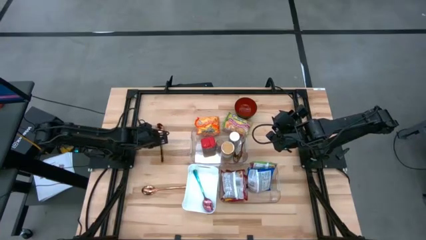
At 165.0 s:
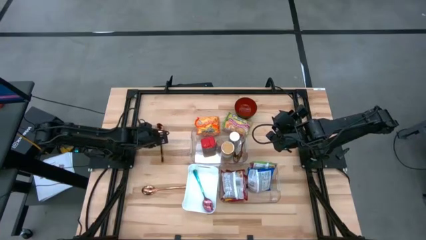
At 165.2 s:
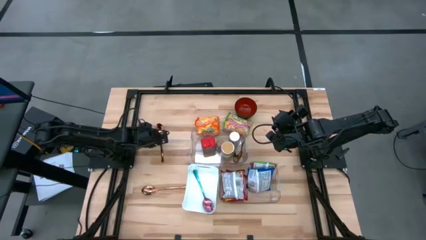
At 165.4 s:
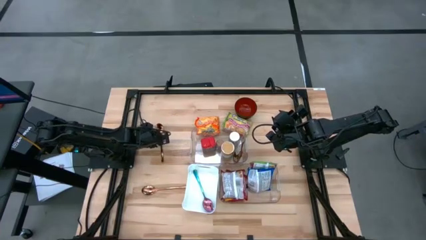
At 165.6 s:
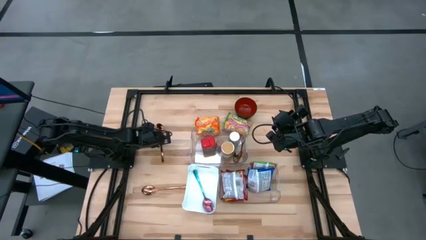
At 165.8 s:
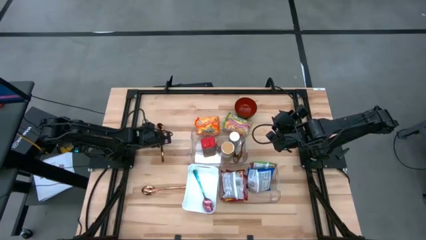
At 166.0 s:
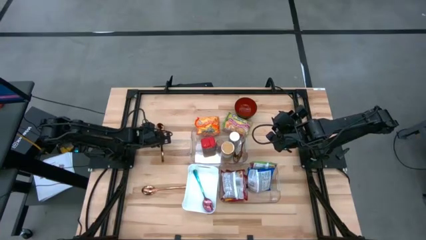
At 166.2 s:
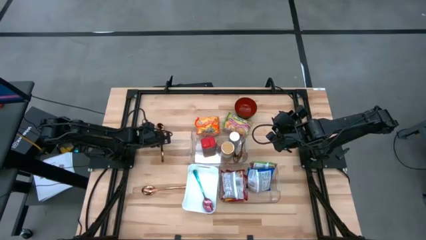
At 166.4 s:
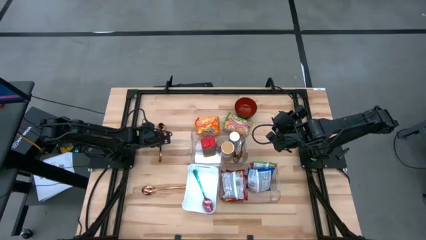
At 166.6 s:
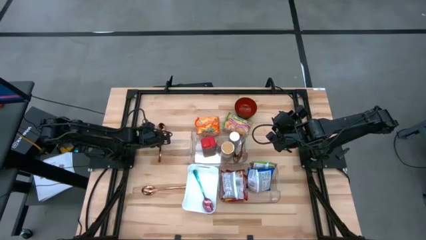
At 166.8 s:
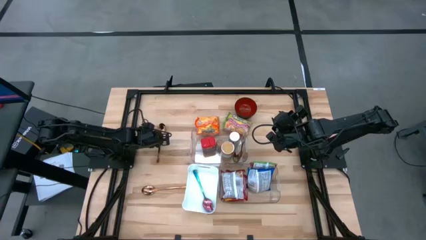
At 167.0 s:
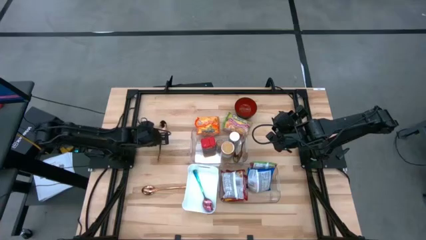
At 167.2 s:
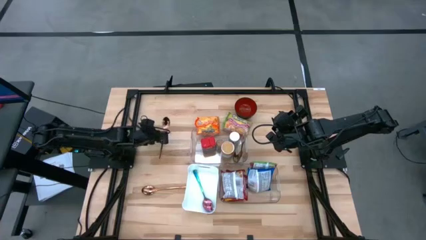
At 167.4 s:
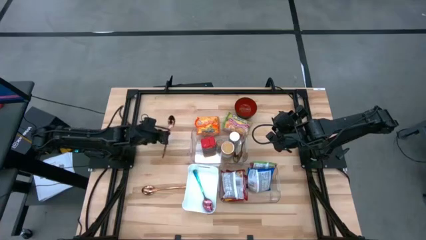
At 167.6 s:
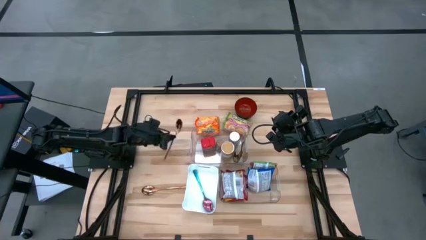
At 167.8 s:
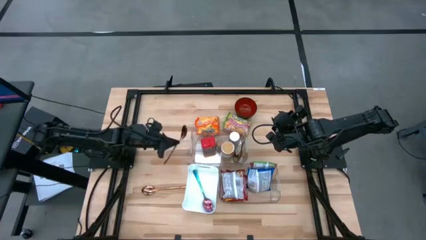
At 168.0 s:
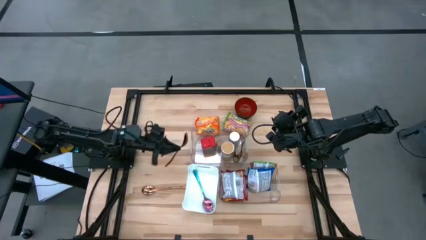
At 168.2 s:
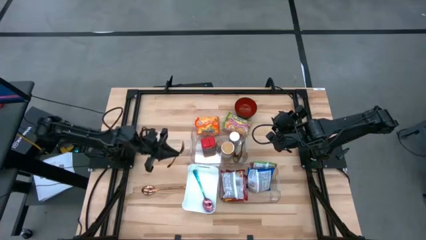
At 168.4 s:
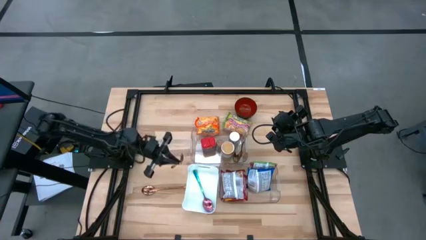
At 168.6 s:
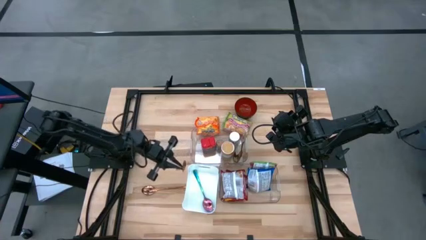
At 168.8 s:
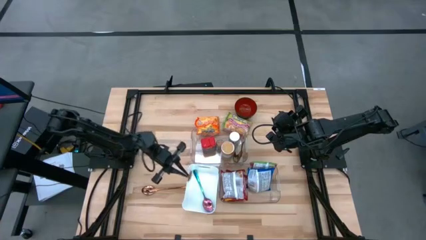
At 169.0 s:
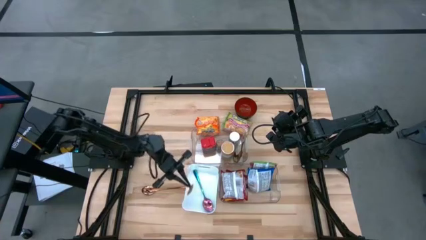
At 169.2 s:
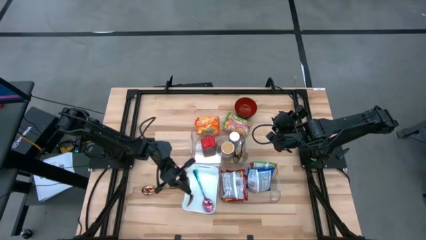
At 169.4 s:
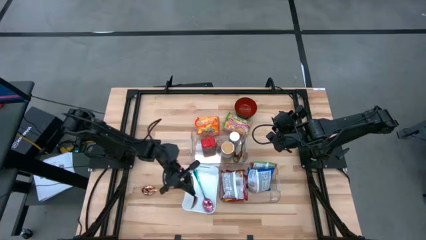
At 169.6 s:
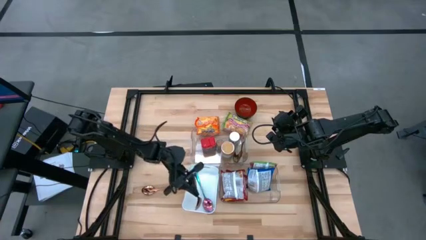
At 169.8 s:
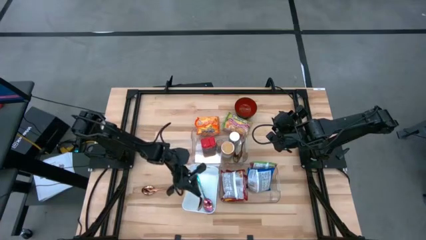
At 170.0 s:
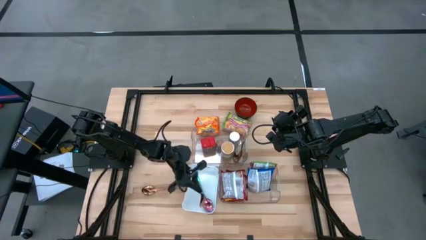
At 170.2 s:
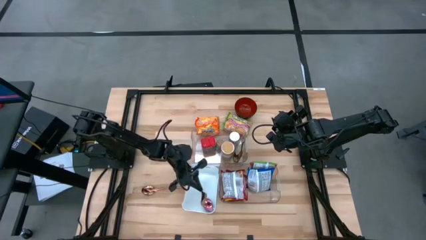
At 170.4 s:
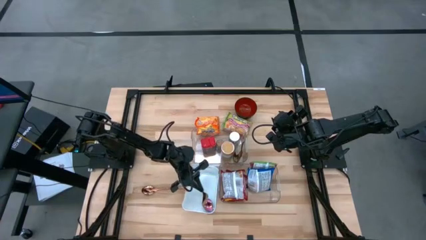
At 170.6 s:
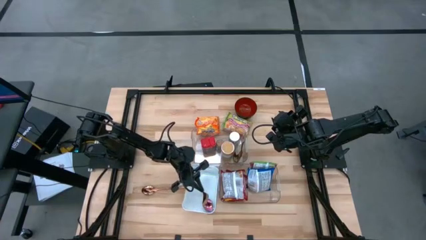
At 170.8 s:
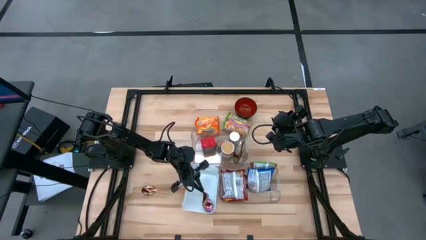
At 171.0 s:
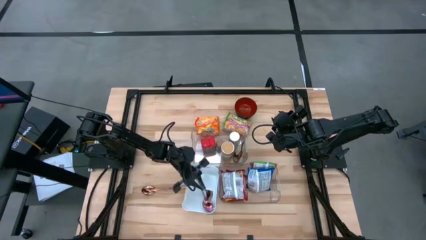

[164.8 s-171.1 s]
Task: Pick & Place Food Item
Put the gold spoon into the white bin
